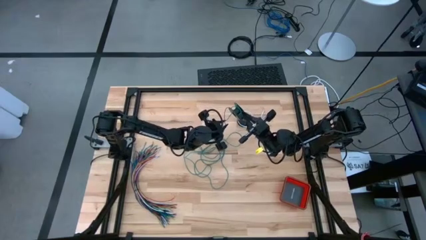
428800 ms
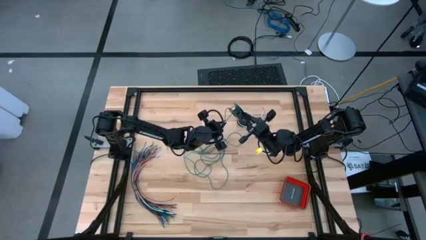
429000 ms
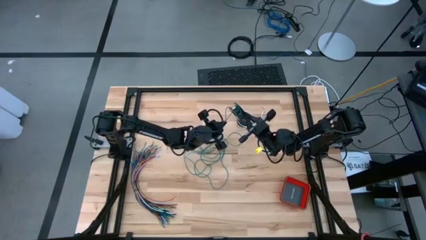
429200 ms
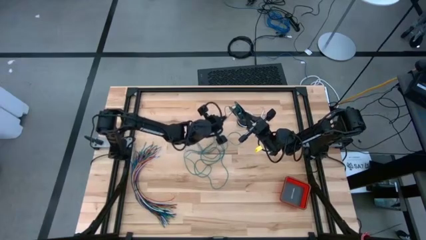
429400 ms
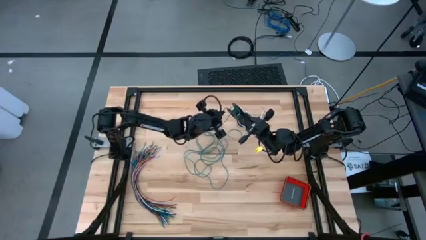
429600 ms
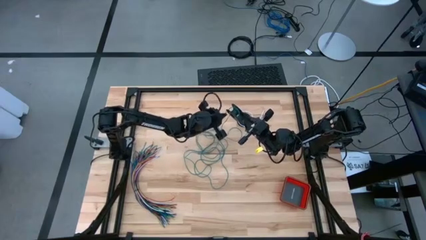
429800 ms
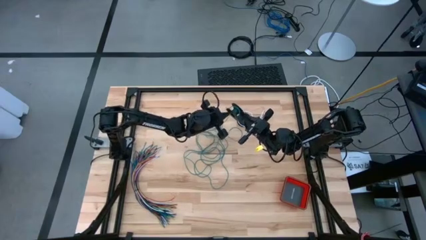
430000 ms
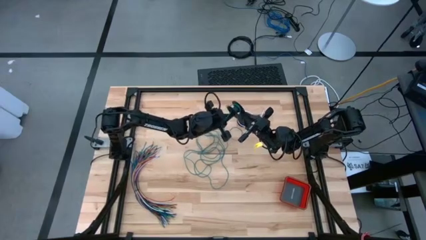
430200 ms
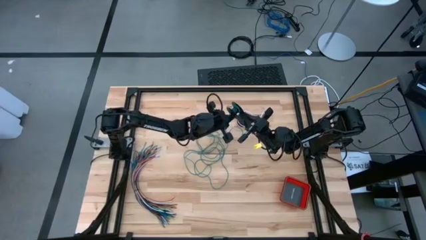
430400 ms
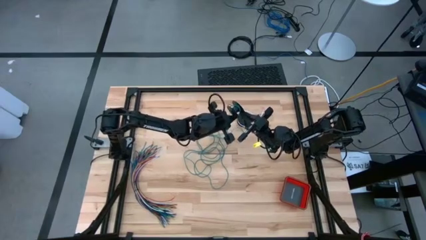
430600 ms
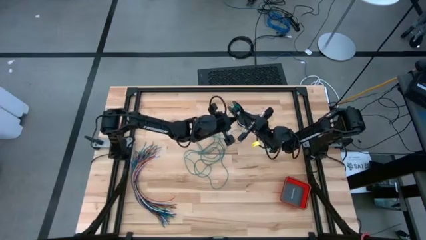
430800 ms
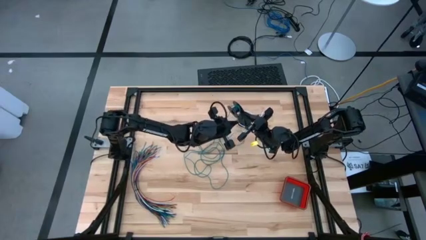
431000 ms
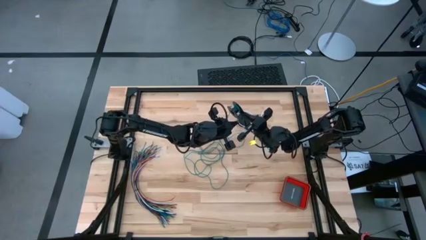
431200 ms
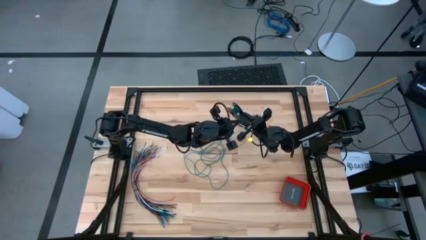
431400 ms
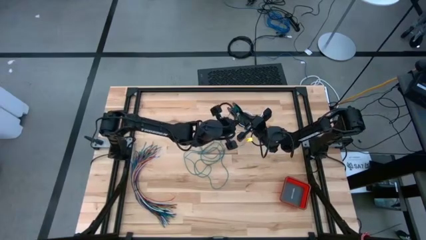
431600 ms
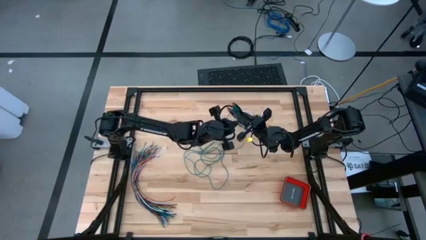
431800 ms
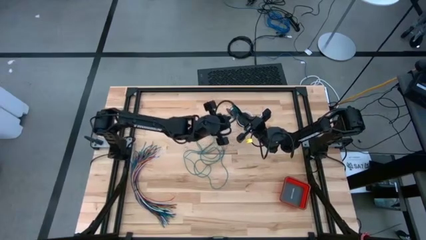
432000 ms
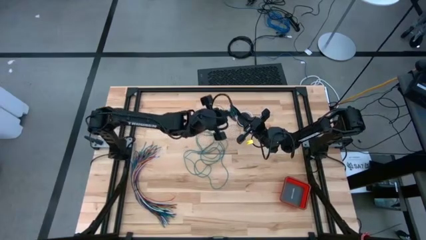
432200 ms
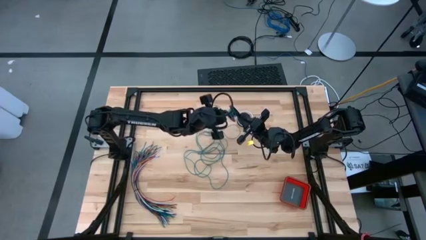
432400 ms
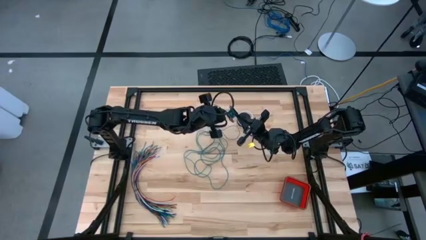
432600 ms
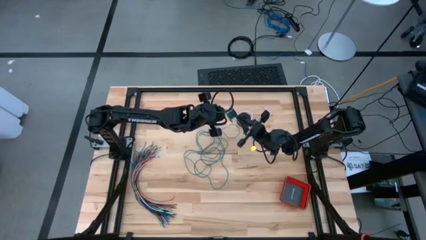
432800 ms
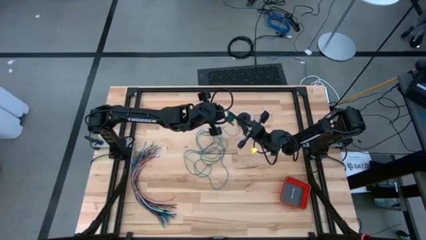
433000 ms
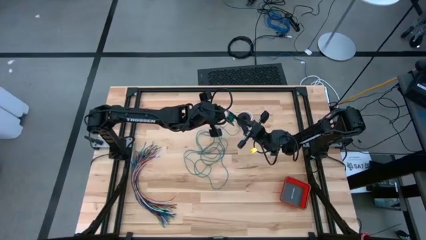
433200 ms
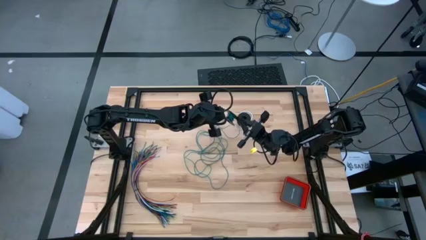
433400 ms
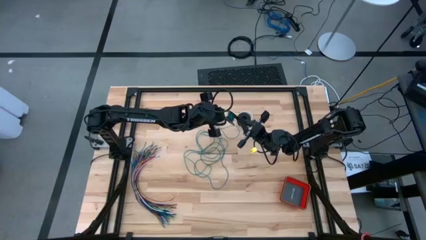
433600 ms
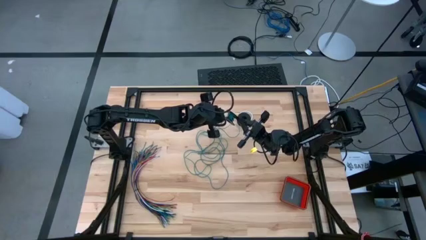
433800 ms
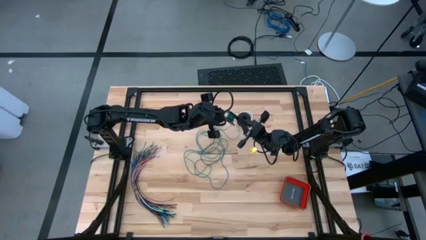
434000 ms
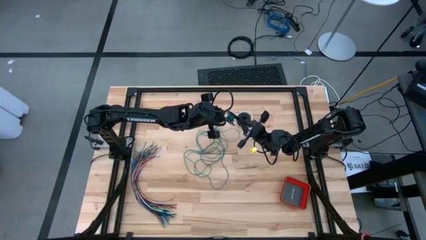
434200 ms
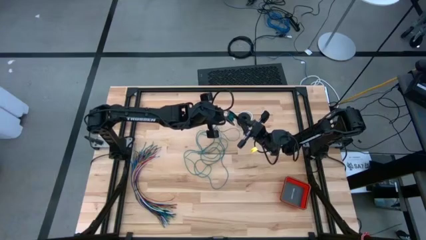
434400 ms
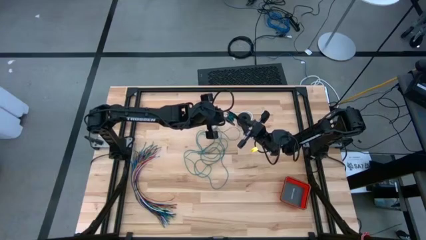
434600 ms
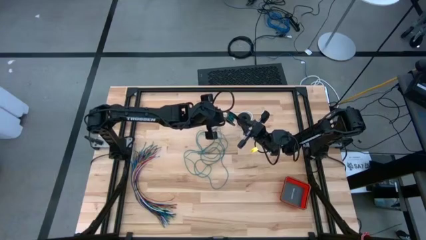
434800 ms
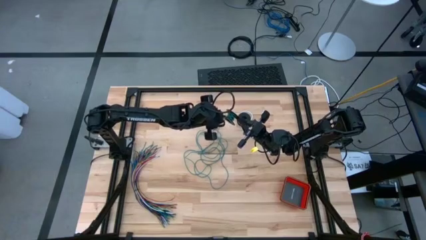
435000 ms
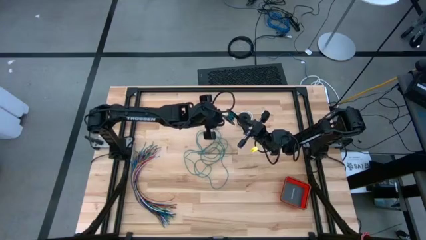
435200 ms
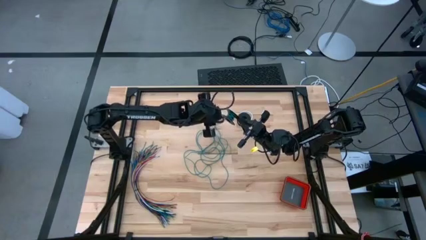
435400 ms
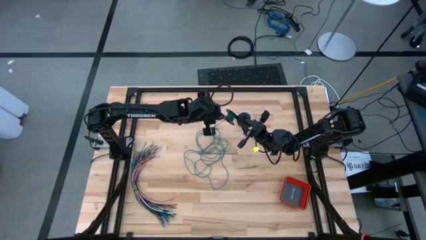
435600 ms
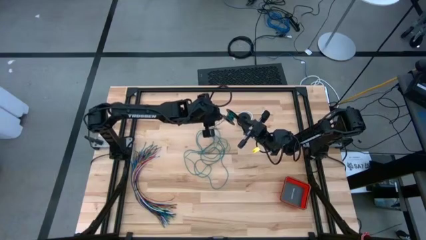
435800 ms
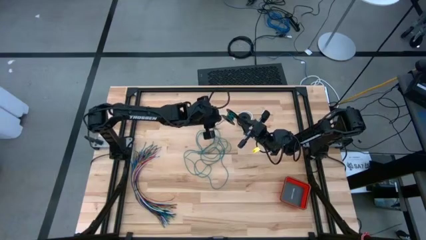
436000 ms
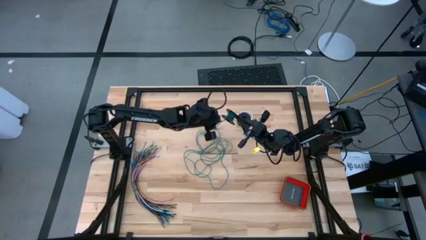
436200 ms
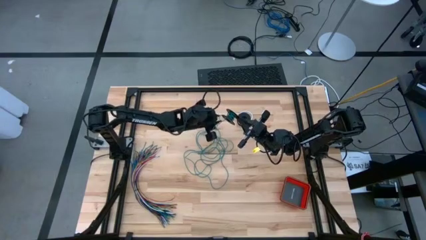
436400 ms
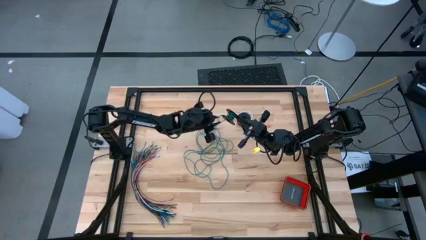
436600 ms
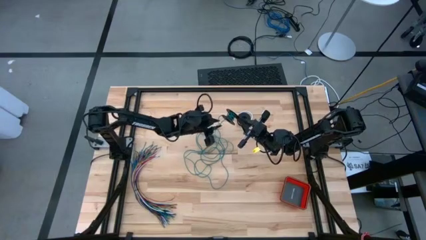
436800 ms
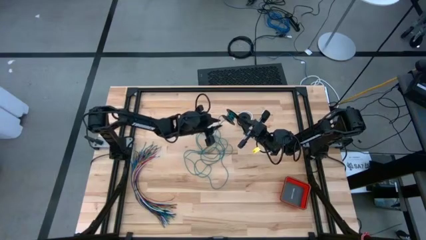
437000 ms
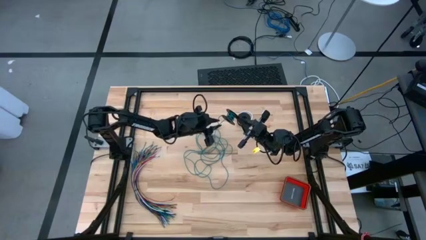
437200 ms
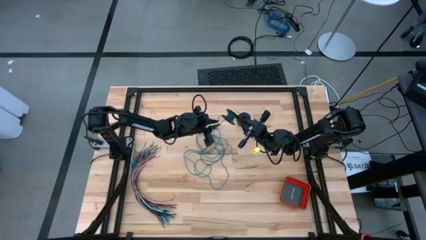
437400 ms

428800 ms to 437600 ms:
Task: Coil cords
Coil the green wire onto the spool

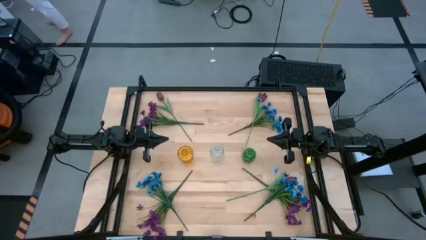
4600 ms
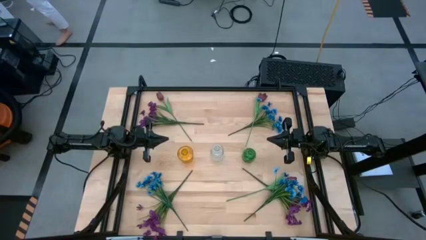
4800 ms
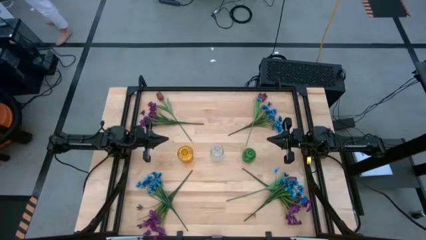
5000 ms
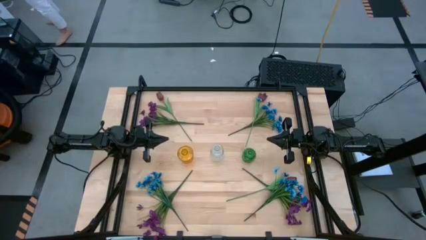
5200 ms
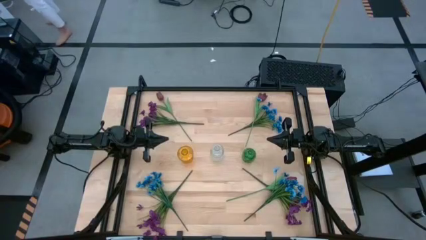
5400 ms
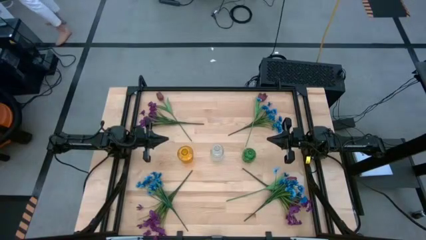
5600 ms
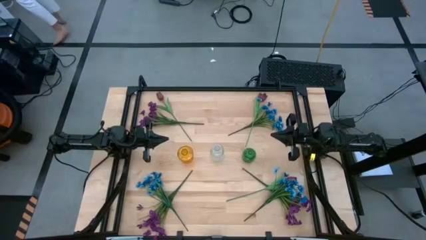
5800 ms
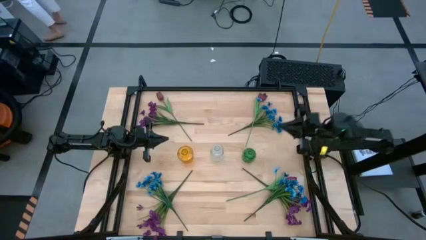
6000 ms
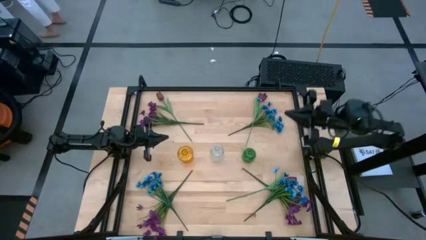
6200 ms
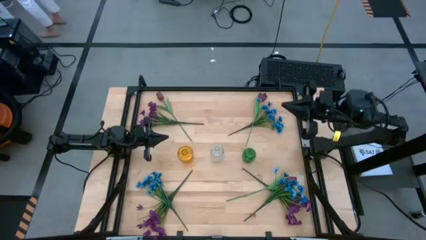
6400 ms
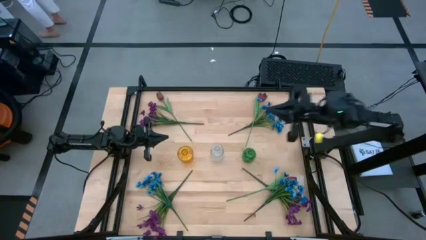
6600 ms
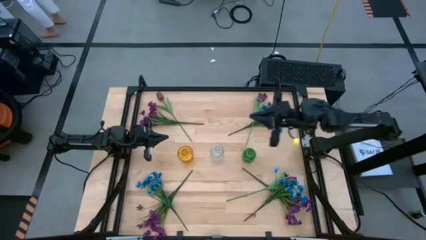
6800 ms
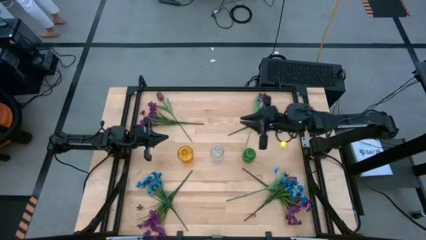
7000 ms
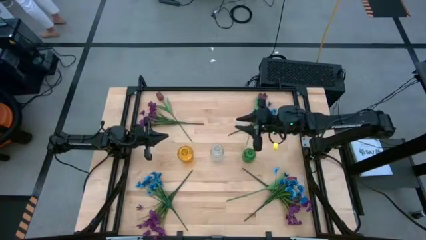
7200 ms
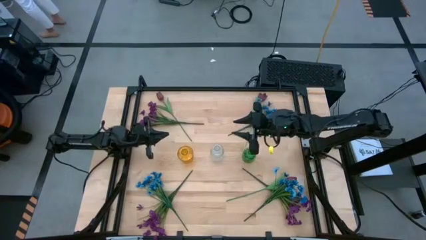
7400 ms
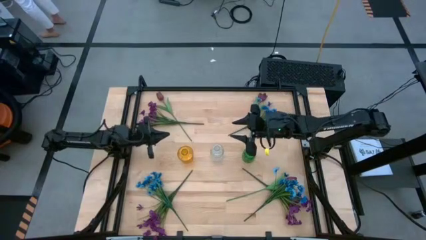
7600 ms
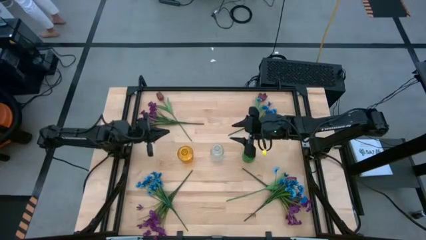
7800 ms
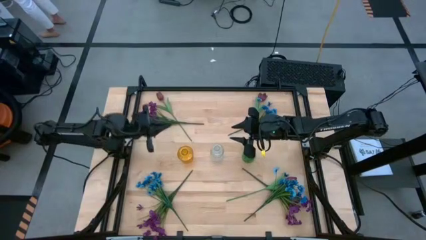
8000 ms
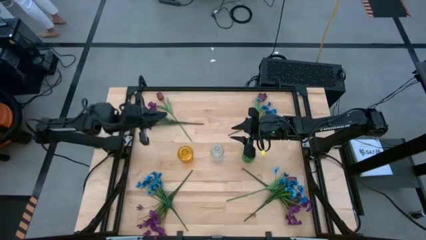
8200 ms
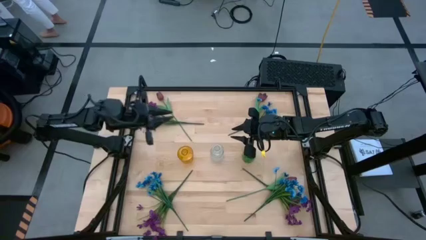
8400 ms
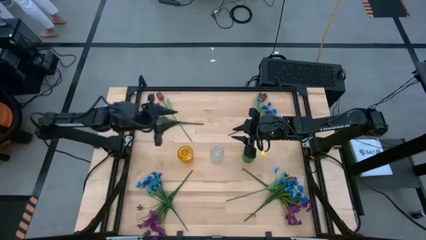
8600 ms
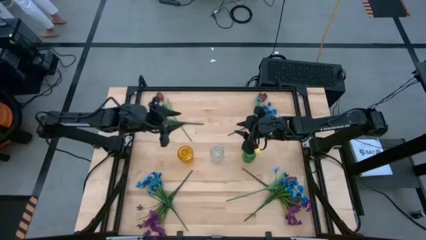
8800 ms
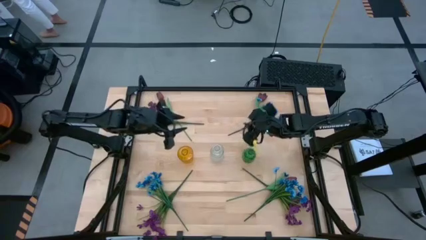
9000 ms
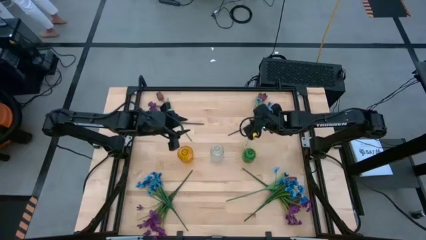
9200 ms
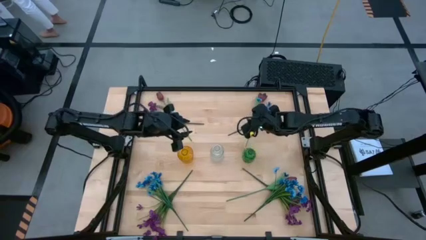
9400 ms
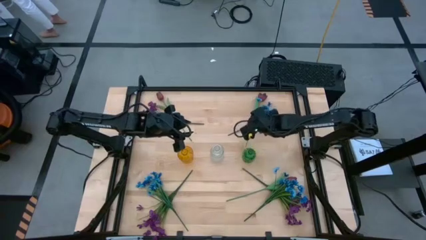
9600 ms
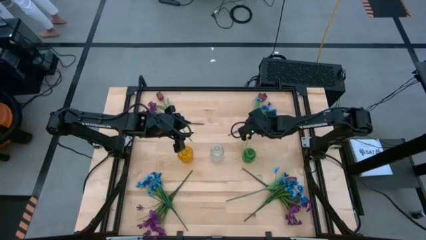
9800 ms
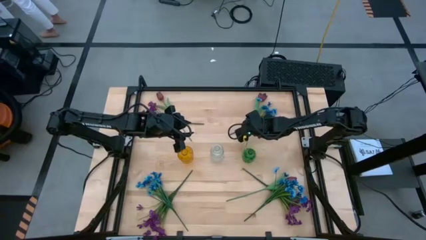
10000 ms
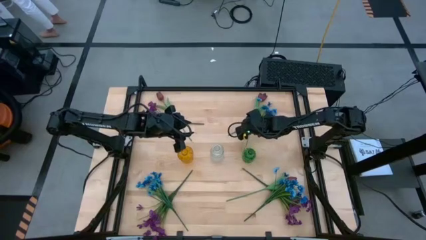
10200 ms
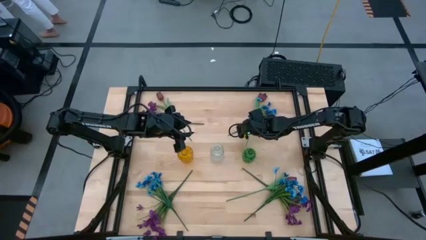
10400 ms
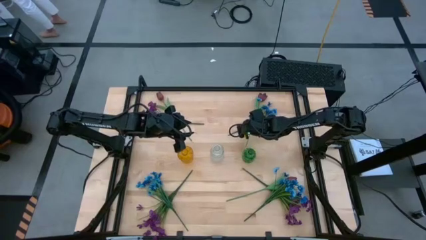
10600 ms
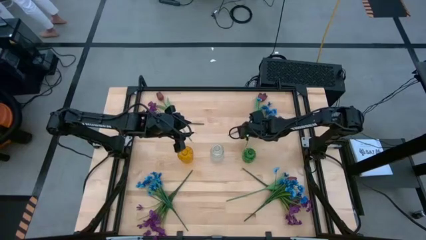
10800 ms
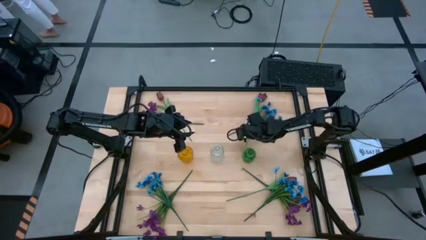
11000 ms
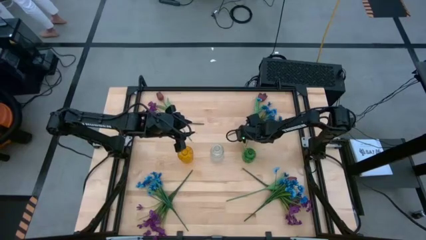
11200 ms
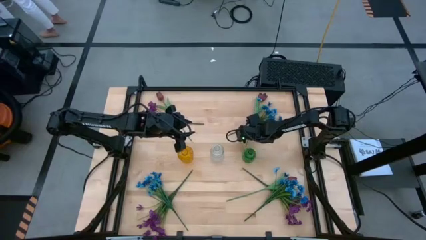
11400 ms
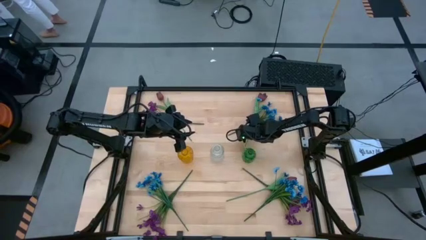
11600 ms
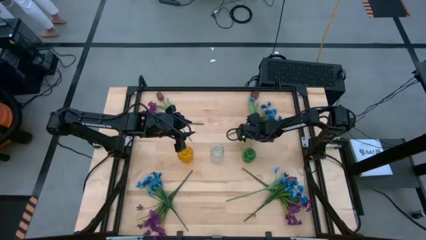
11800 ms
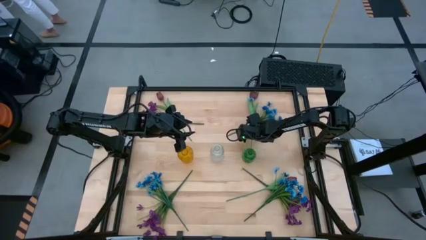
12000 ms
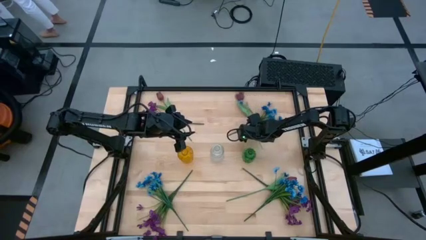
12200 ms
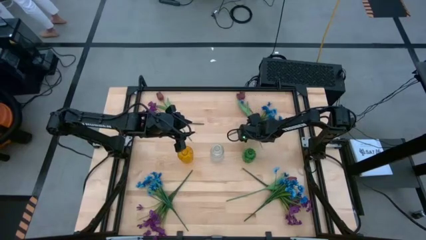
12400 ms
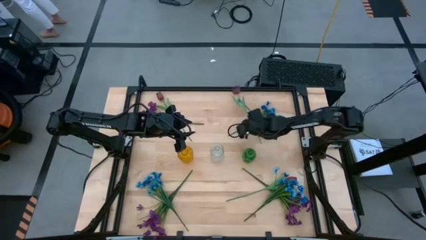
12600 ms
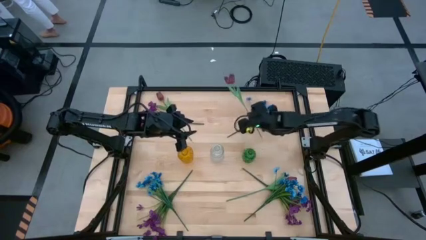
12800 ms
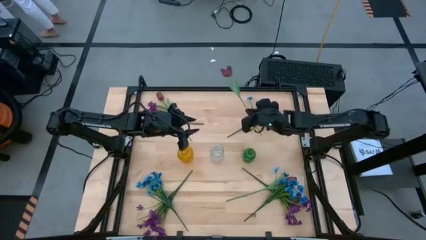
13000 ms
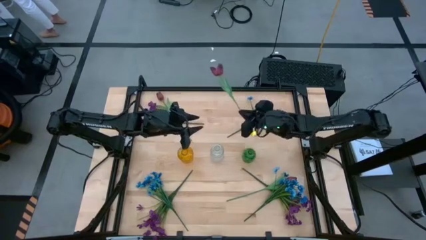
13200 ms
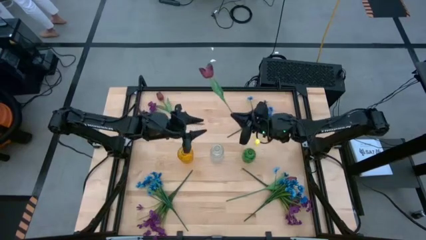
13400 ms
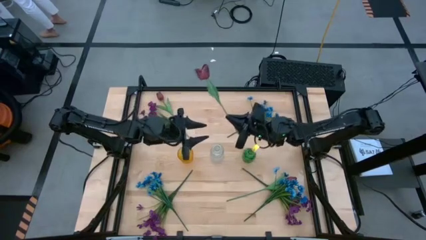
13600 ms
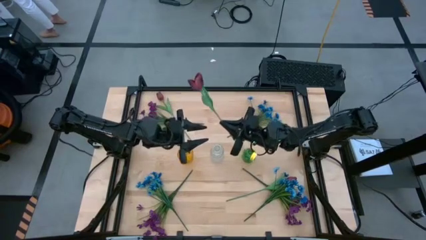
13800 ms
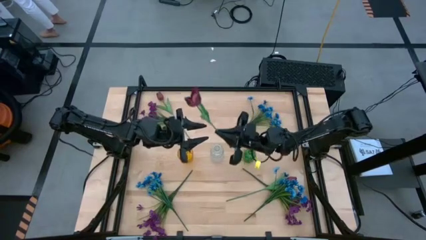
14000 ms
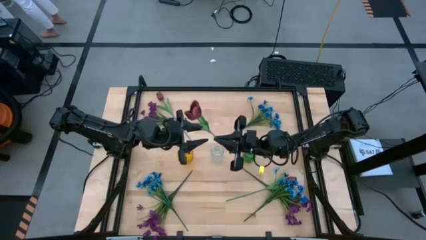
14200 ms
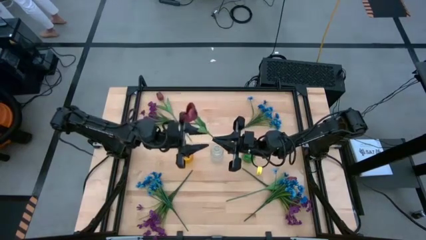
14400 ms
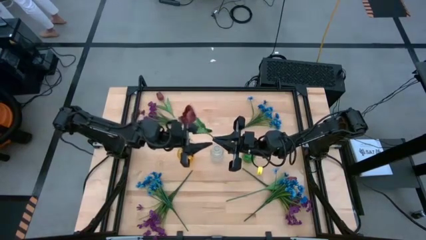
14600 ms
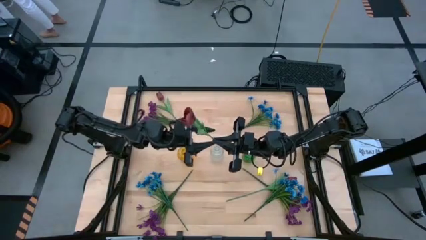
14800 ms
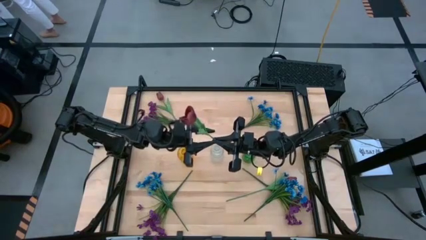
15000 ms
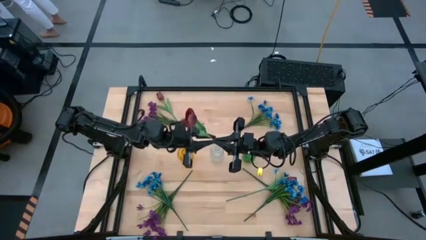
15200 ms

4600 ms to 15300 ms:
Task: Sort flowers into vase by color
Put the top right red tulip into the transparent vase
